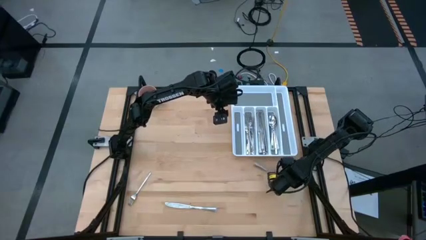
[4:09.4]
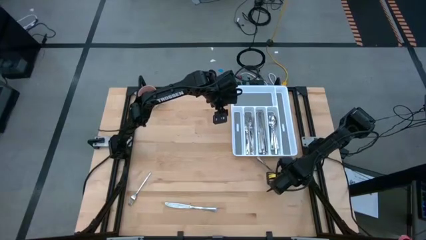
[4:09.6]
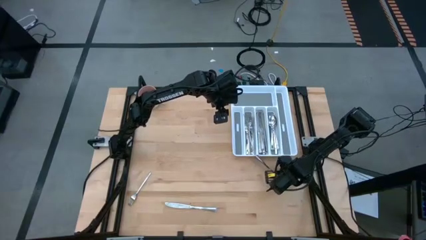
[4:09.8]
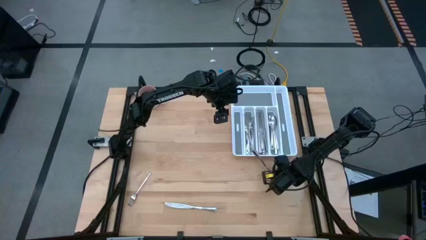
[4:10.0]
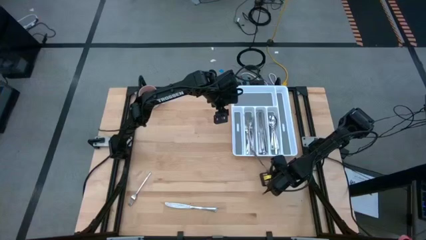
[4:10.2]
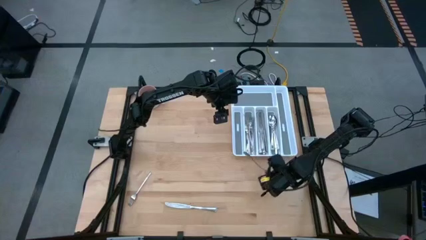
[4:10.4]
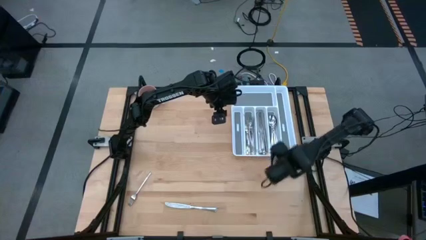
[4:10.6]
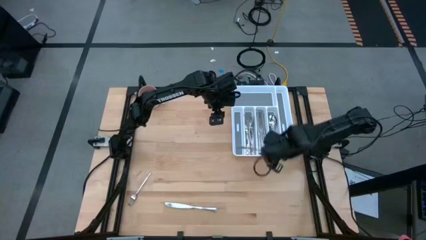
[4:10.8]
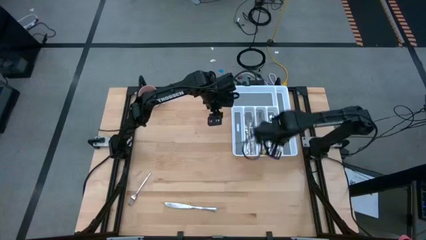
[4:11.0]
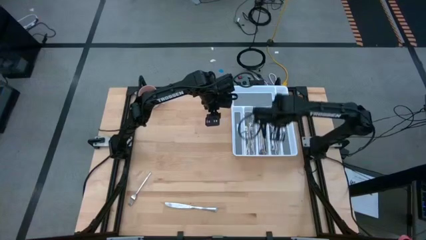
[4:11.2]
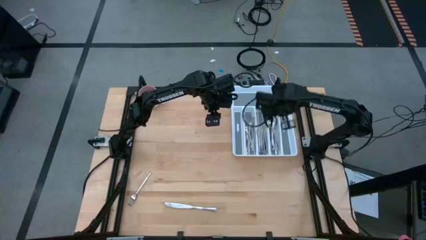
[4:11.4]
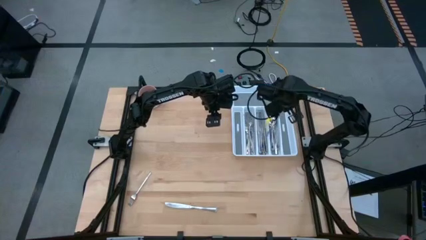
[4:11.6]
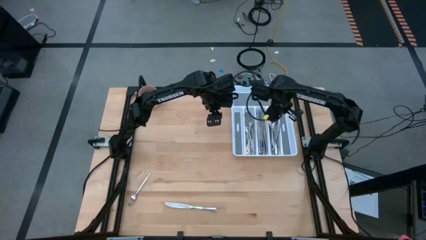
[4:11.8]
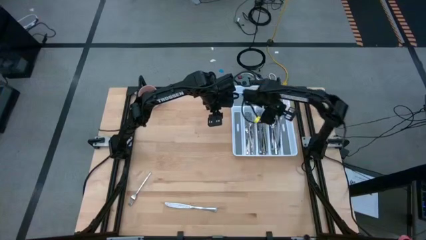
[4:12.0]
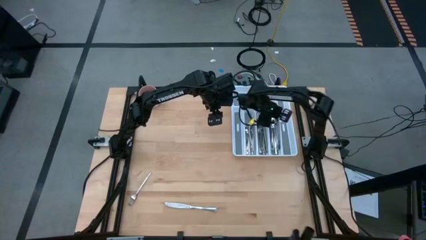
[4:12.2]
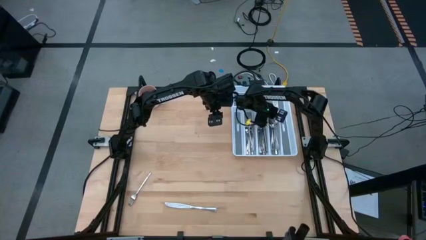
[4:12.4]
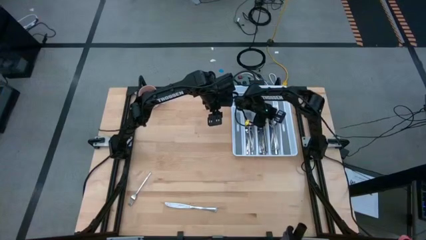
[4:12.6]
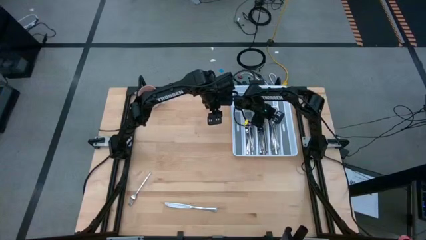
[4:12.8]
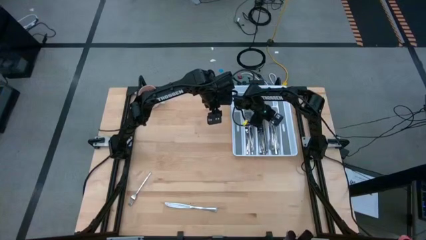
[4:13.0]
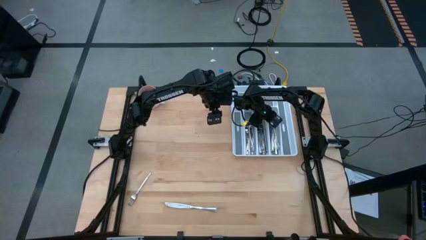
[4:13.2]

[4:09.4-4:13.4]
Task: Sort silverware
Put the silver spoon into the silverware tray

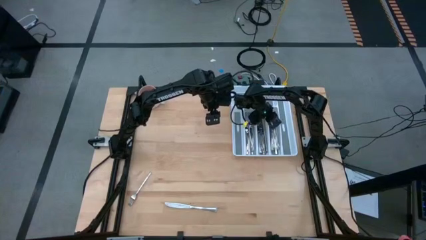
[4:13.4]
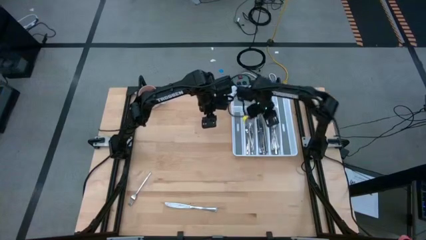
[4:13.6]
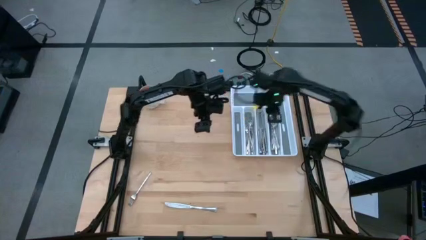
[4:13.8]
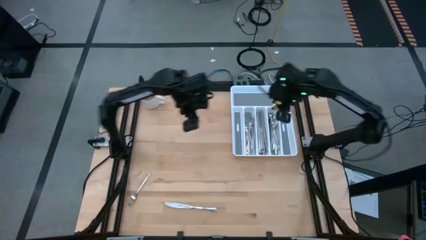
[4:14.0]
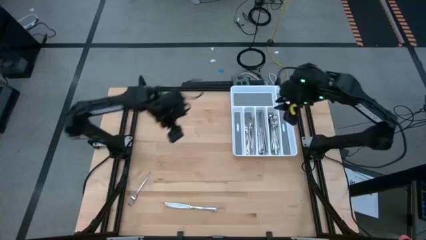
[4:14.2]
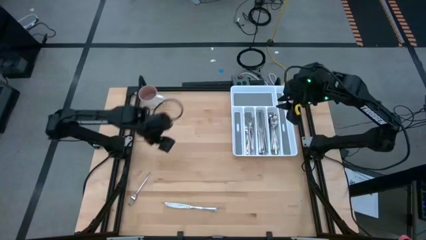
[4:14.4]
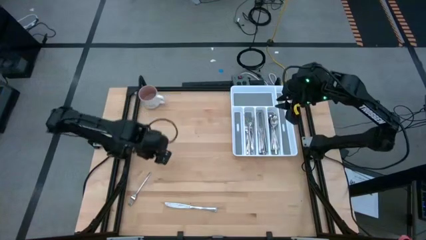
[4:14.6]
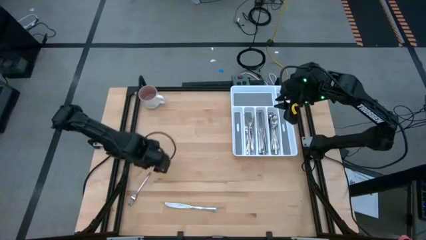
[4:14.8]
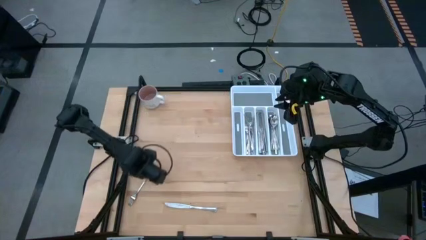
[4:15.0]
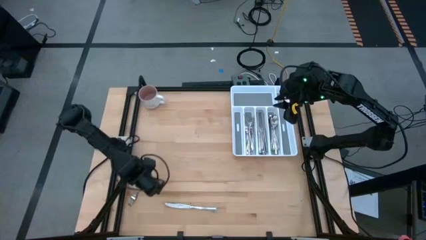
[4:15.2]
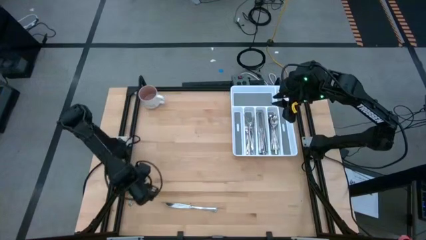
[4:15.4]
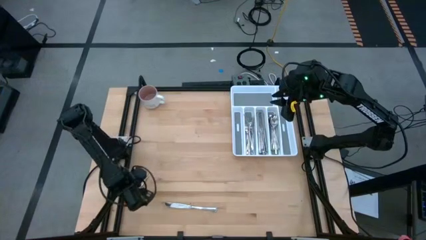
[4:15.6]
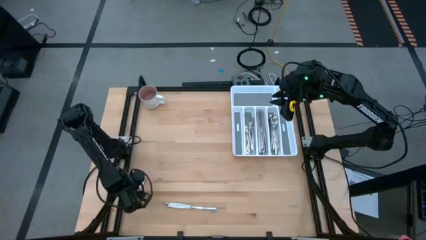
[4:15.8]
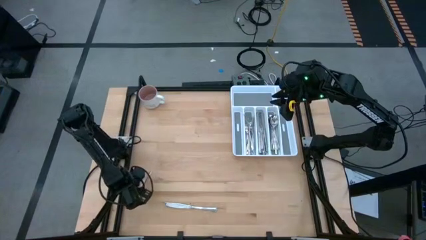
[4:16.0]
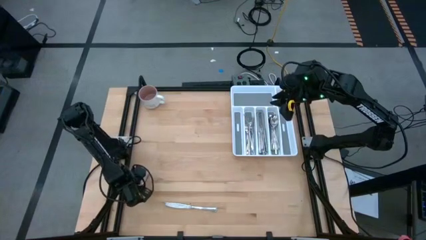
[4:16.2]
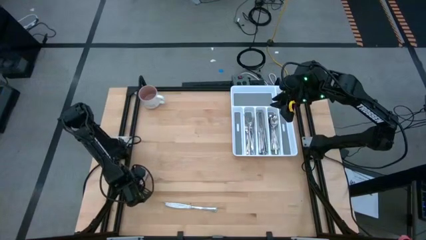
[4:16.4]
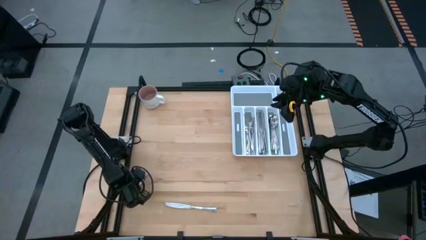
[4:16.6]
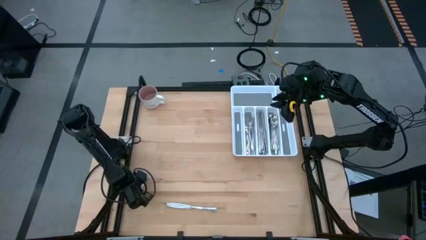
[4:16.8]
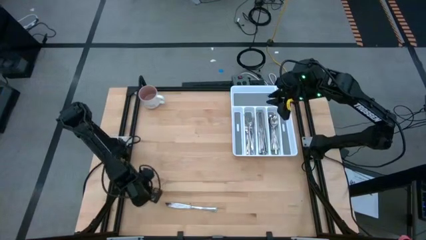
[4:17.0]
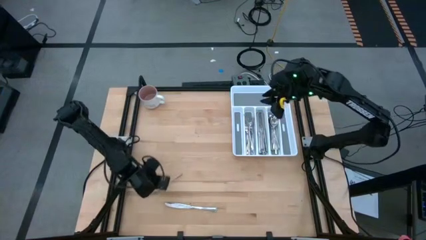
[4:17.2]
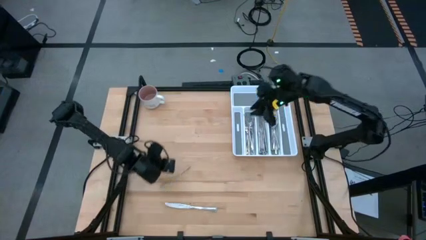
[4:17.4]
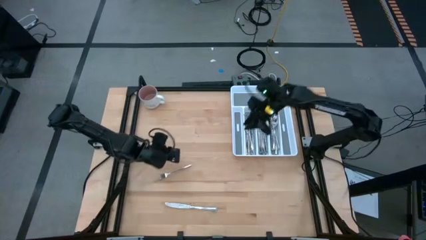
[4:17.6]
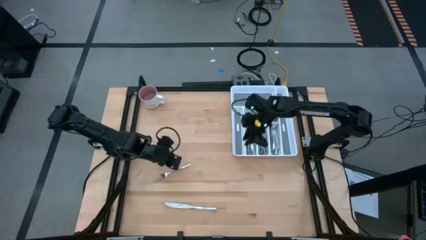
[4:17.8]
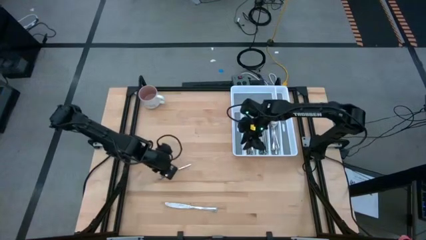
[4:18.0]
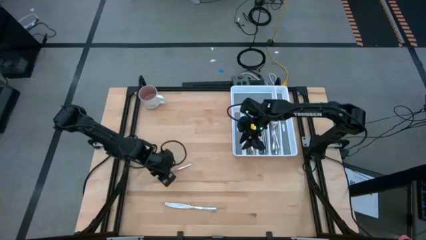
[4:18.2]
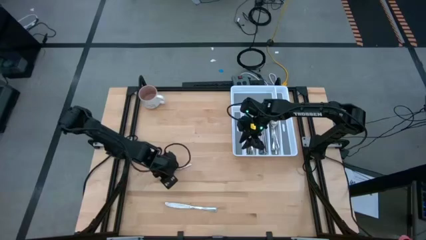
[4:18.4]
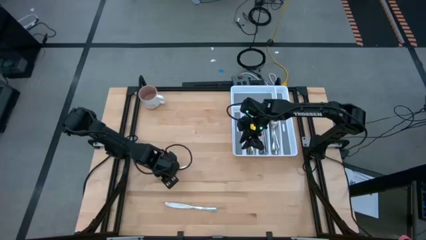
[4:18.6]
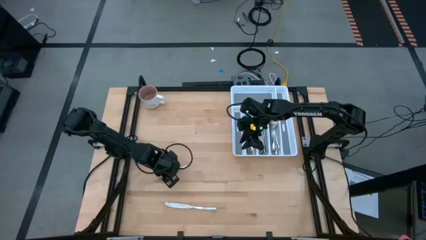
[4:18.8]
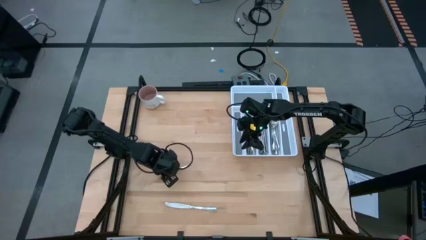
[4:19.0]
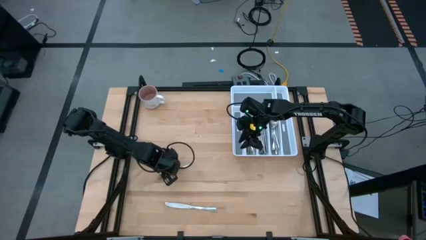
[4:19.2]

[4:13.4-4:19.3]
Put the silver fork into the silverware tray

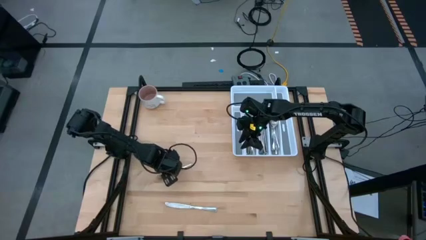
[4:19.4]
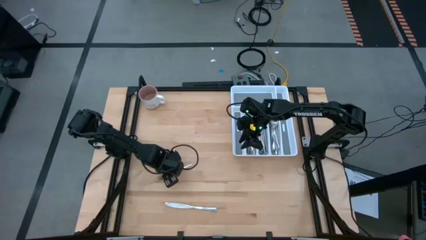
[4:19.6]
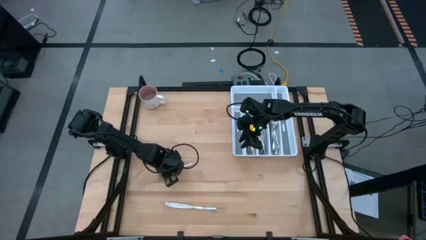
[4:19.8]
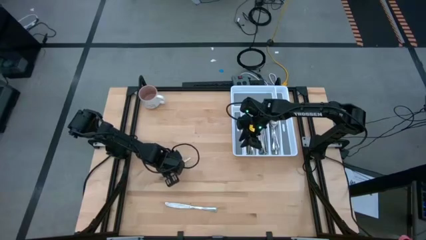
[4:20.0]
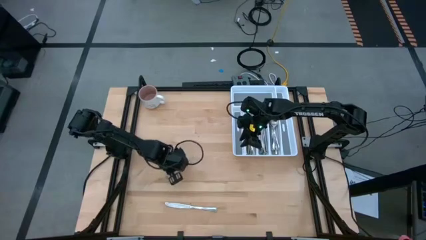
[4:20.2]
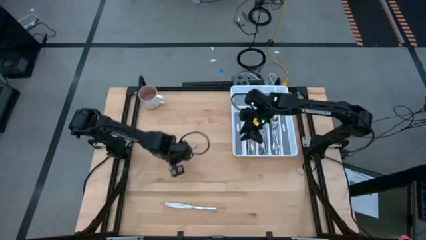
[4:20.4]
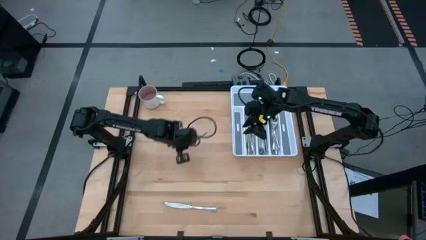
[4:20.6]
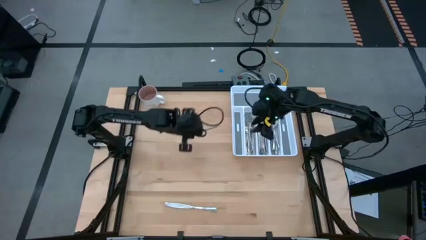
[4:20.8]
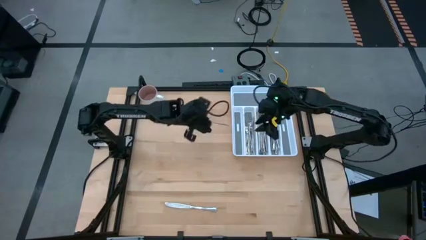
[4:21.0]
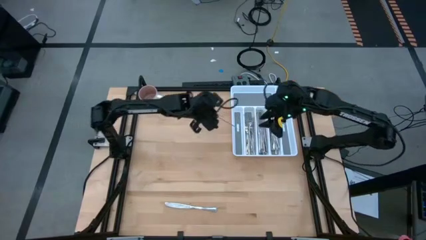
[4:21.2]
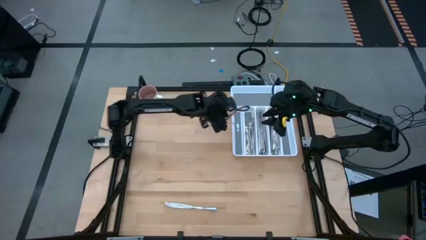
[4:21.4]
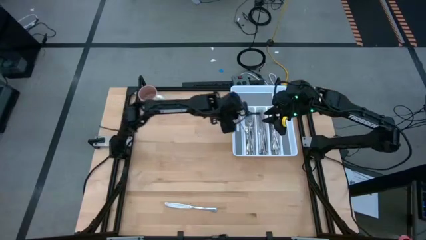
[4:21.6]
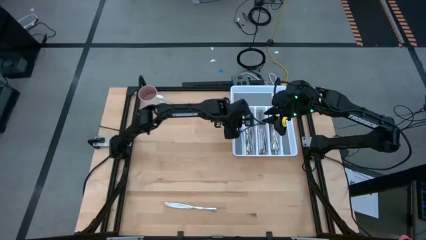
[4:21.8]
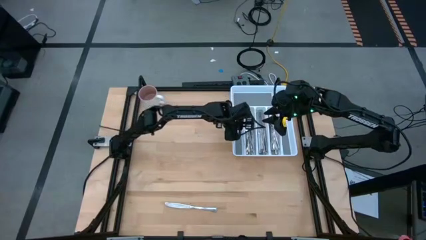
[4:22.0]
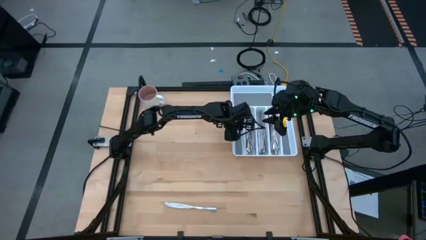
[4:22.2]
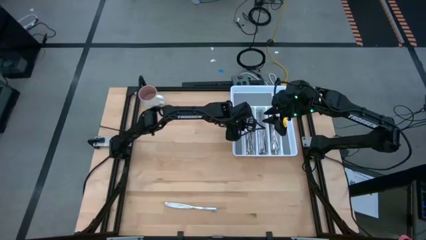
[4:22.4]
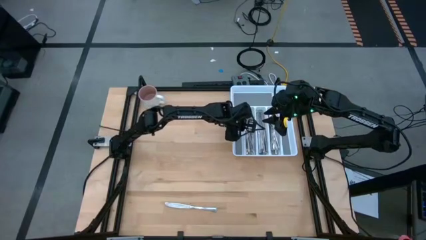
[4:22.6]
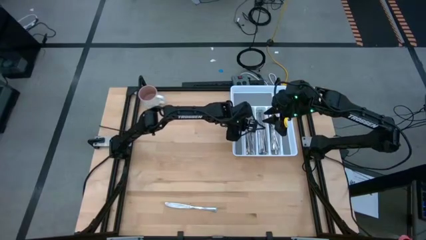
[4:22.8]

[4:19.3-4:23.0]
Put the silver fork into the silverware tray

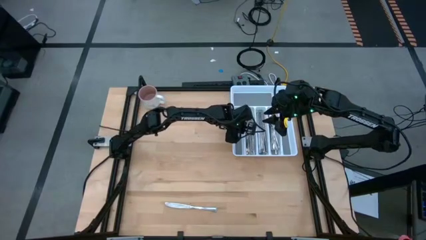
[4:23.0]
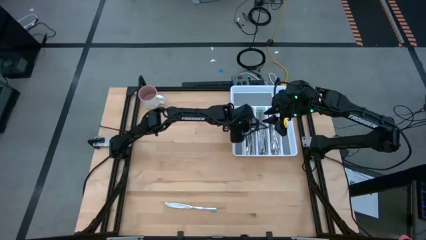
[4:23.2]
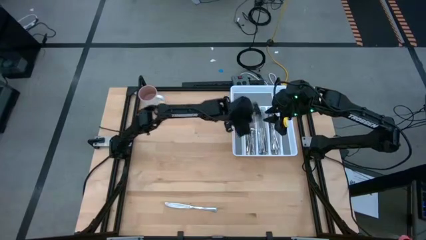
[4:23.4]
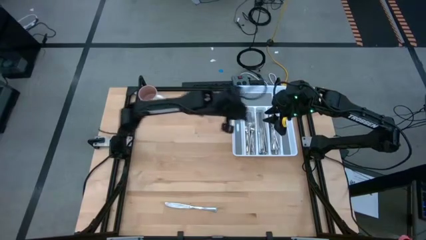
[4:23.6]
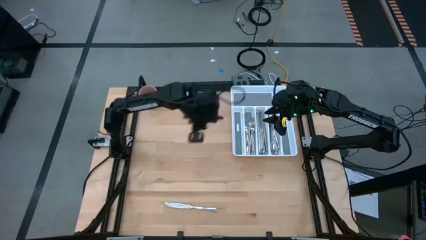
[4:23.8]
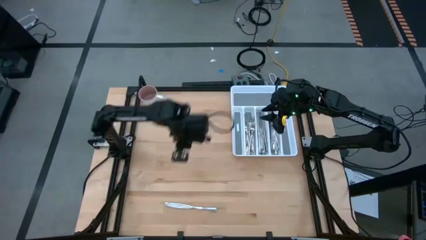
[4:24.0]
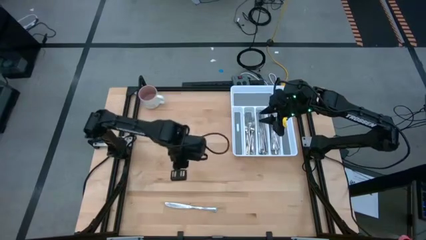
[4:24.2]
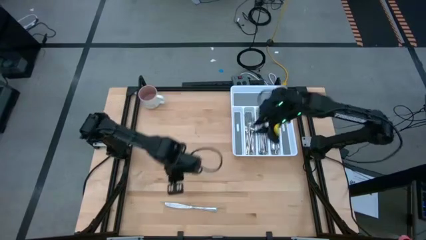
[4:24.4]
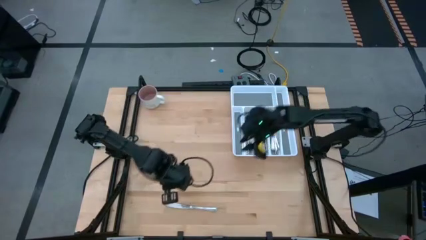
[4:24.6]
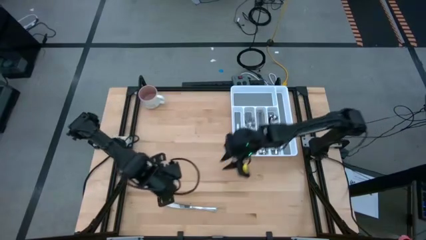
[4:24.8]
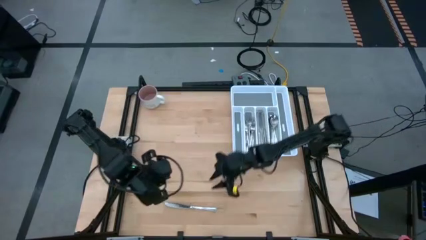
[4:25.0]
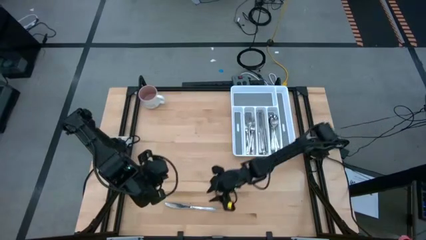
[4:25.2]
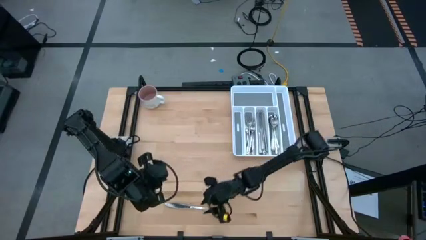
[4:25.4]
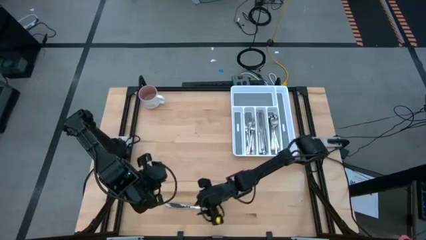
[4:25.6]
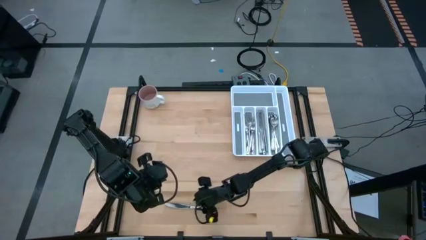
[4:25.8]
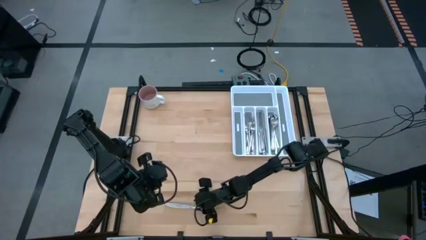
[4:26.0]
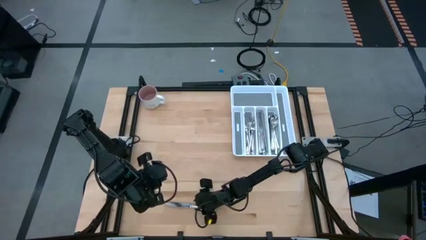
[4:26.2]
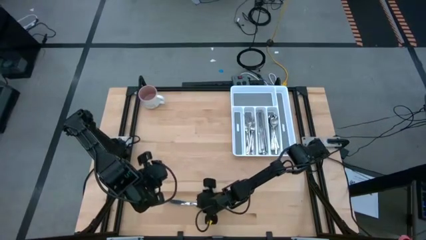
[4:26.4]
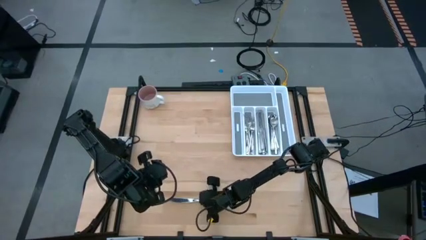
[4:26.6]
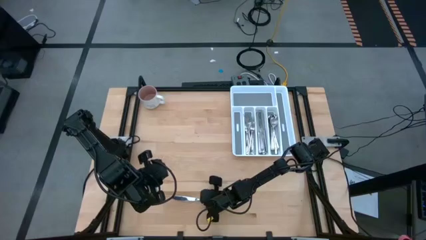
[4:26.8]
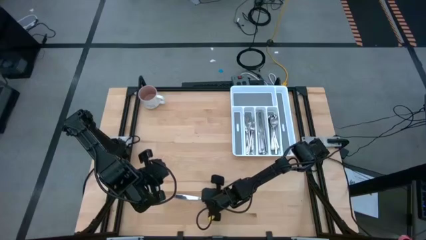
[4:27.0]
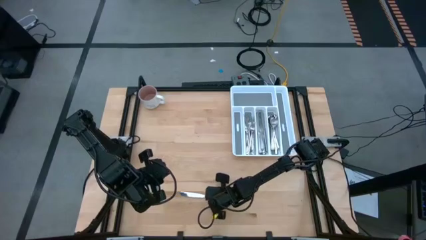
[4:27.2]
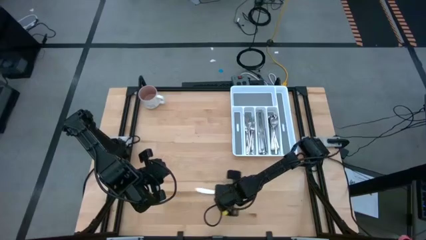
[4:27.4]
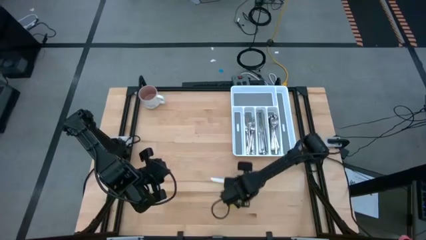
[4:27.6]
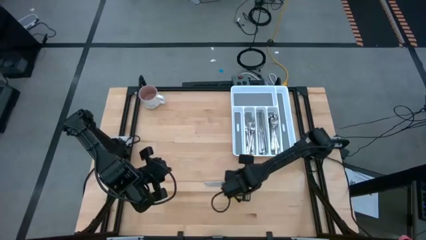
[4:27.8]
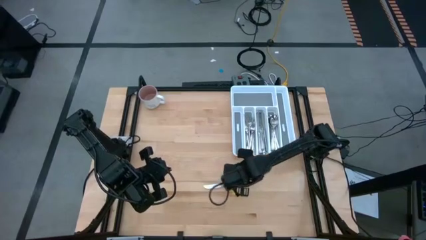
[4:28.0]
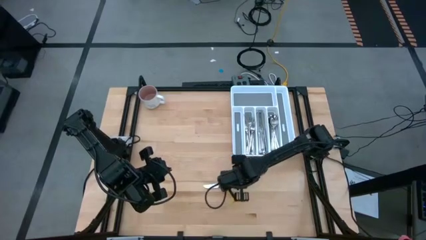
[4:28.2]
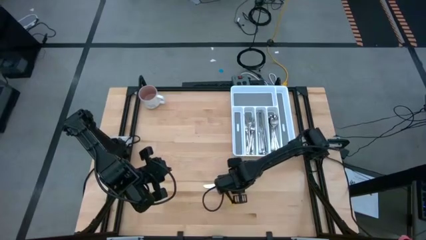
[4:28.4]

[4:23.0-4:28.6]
Put the silver table knife into the silverware tray
